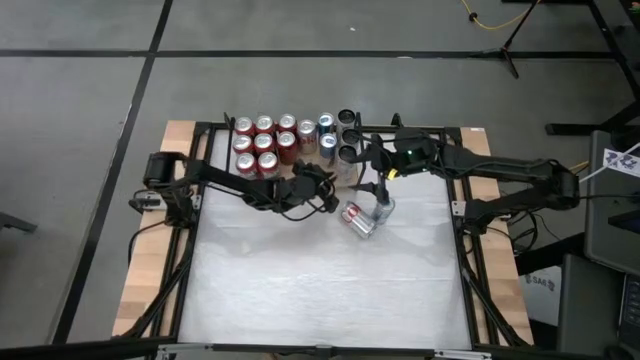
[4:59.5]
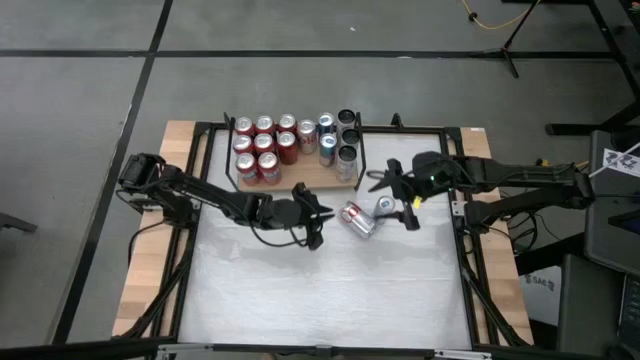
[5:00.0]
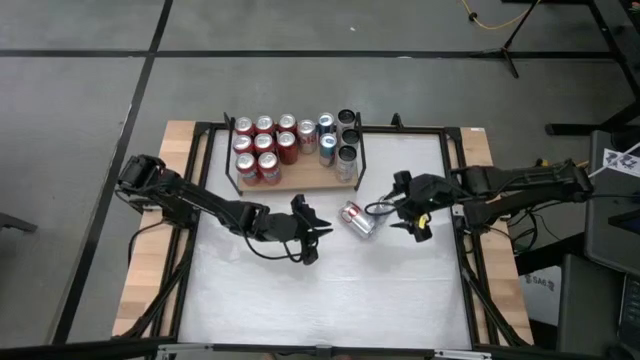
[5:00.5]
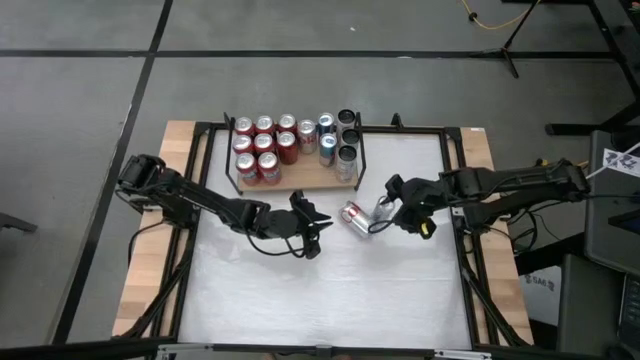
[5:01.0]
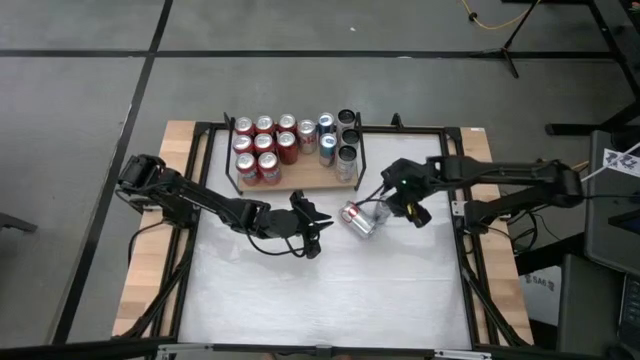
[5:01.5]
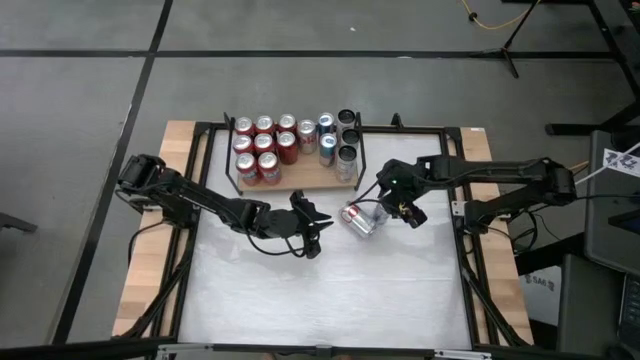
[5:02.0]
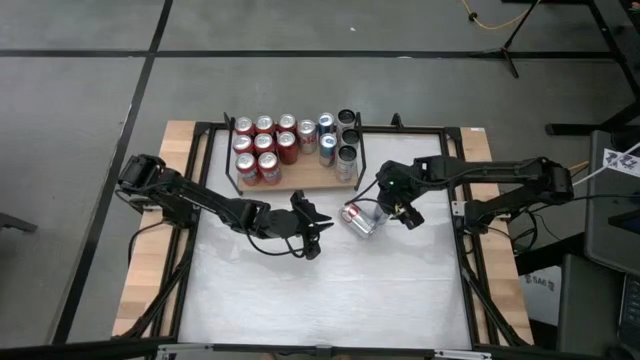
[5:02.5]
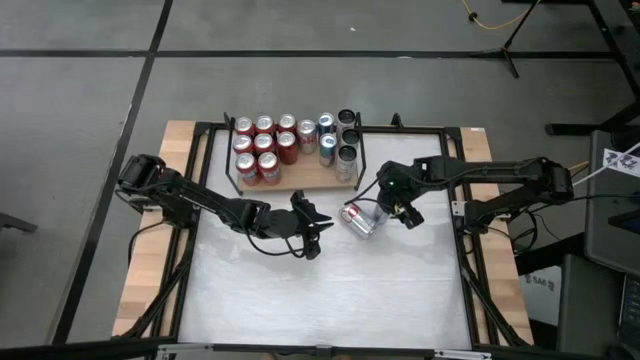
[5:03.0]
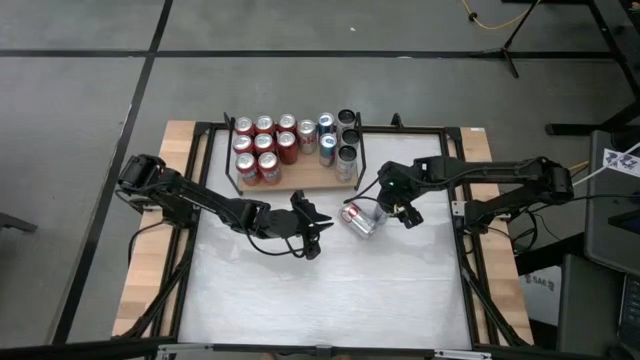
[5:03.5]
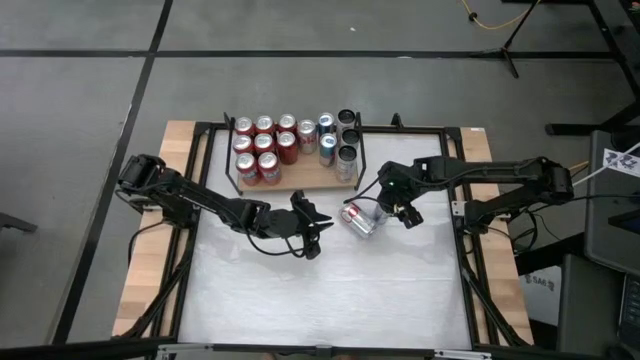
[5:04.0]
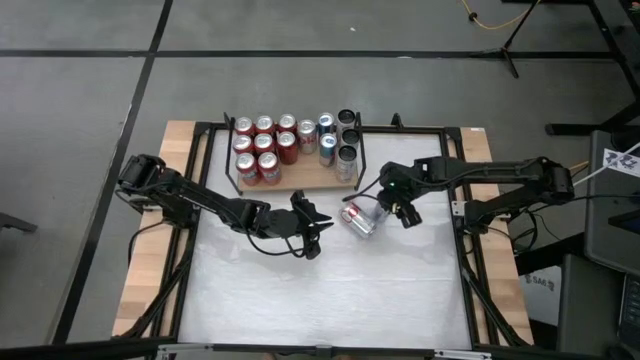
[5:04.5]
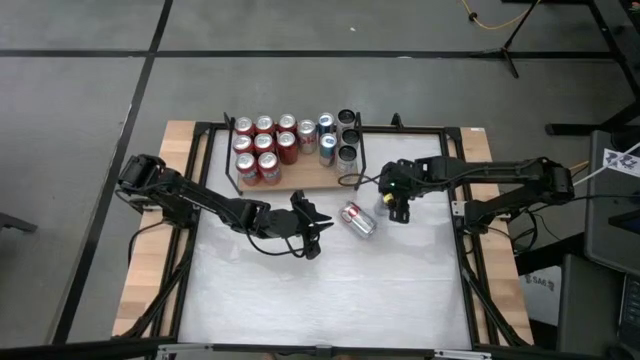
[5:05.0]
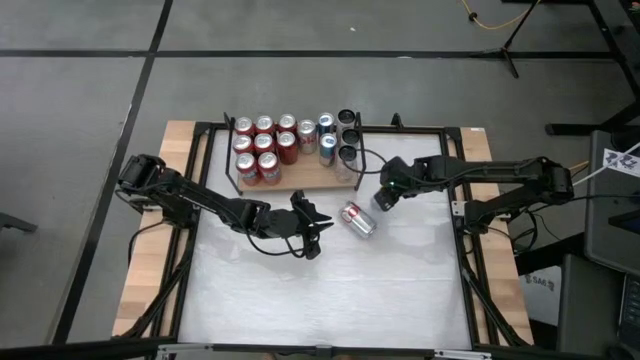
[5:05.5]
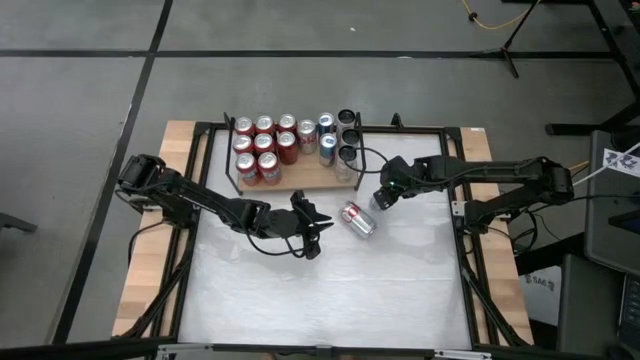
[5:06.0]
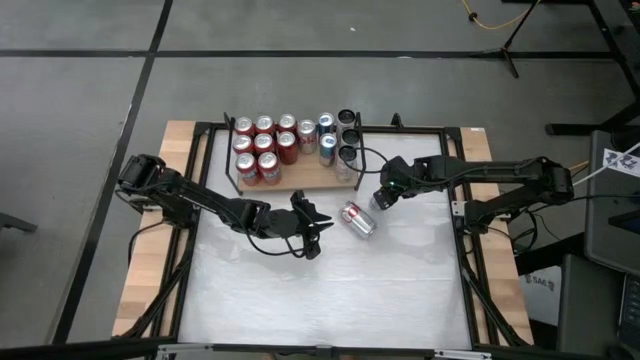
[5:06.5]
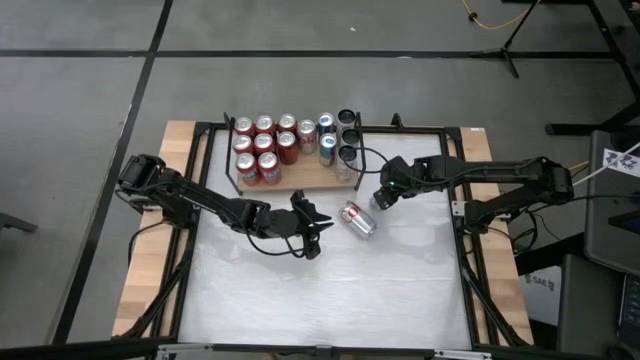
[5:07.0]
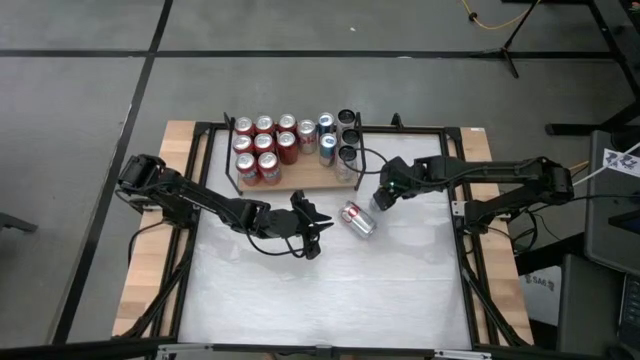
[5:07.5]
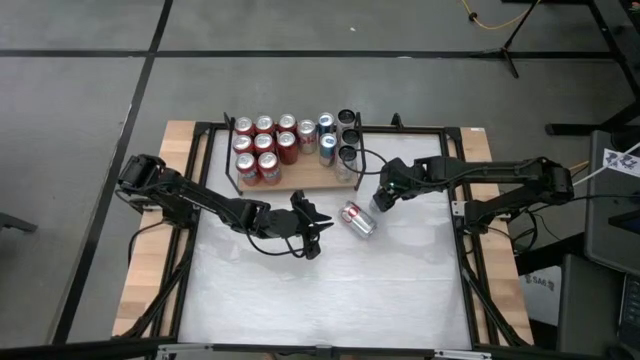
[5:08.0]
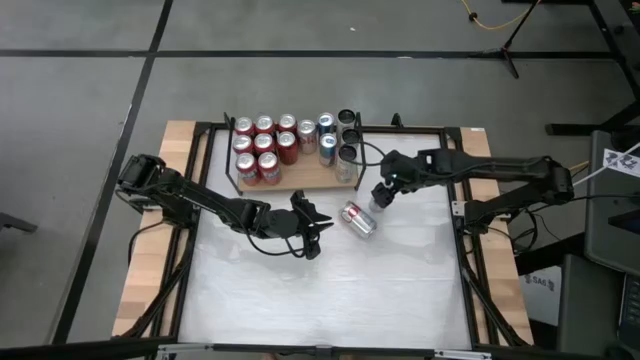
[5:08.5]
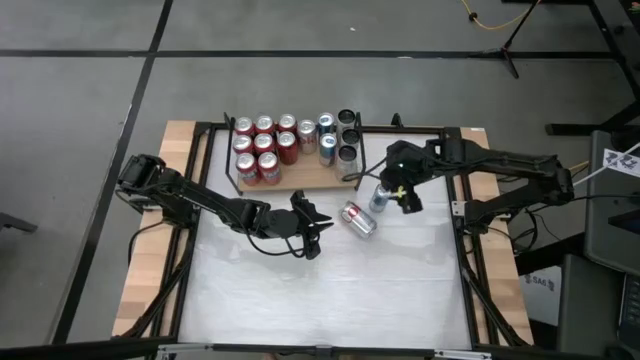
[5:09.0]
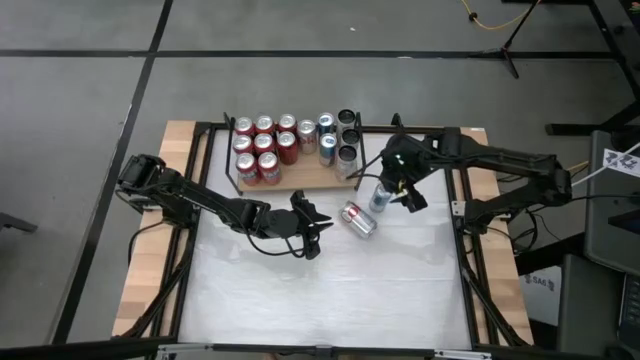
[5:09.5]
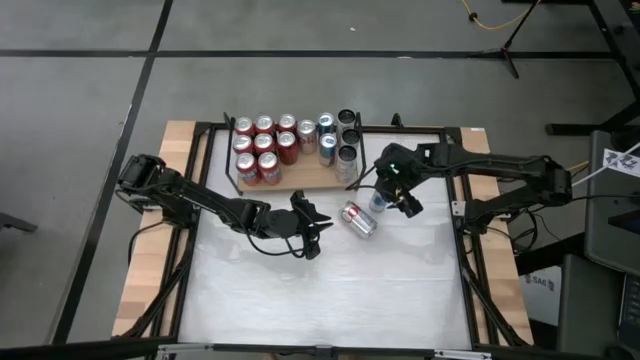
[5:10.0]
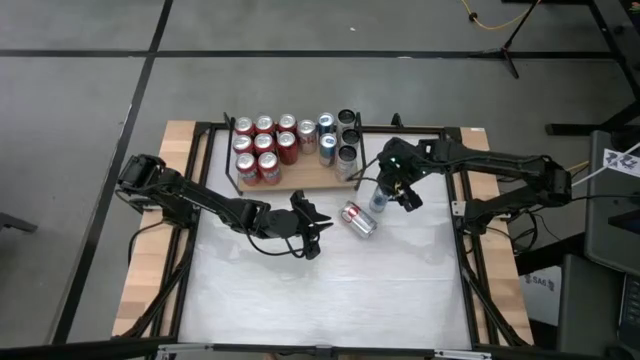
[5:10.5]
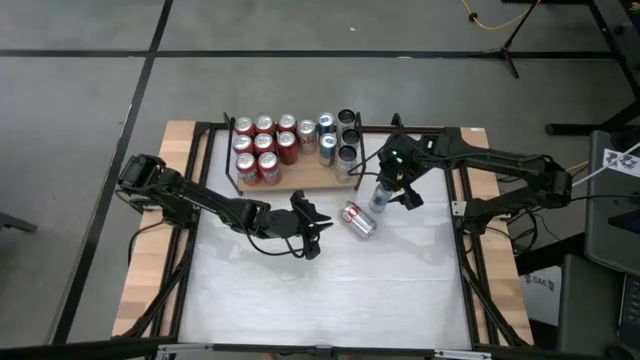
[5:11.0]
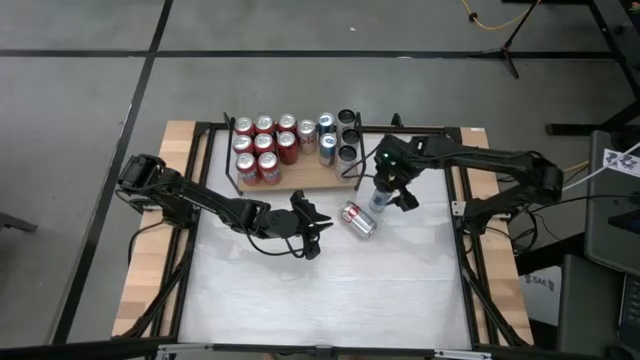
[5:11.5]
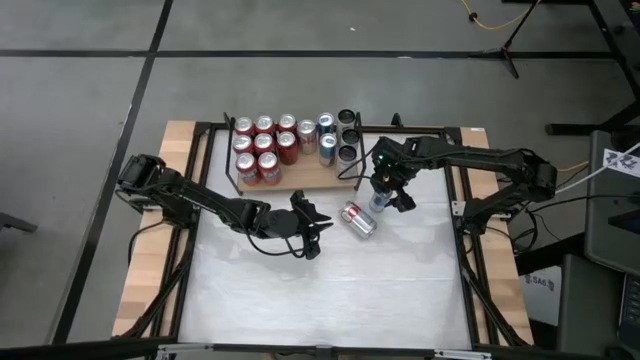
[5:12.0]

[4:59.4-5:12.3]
Task: Place canned beverage on shelf
Put the blue soda can on the shelf aligned with the other blue soda cans

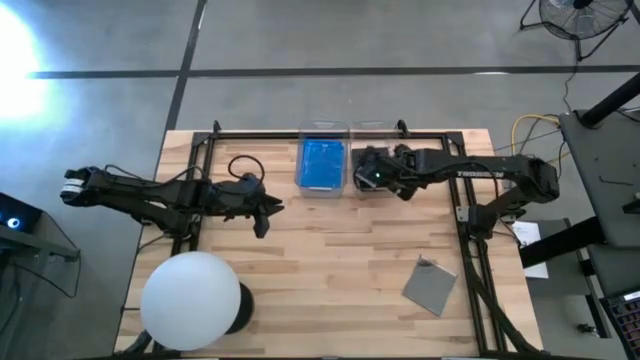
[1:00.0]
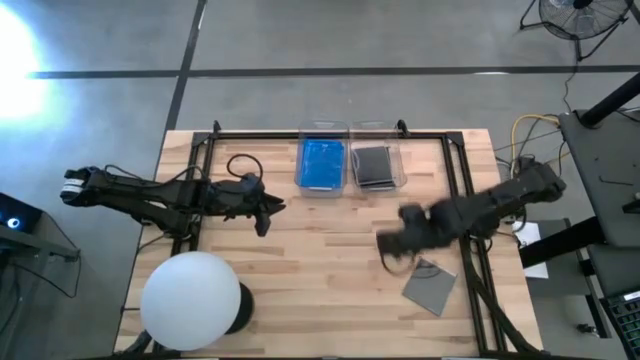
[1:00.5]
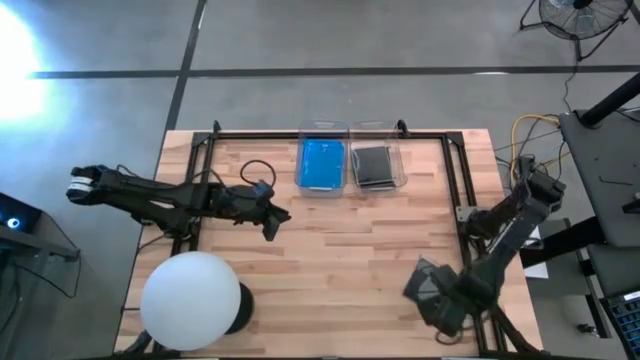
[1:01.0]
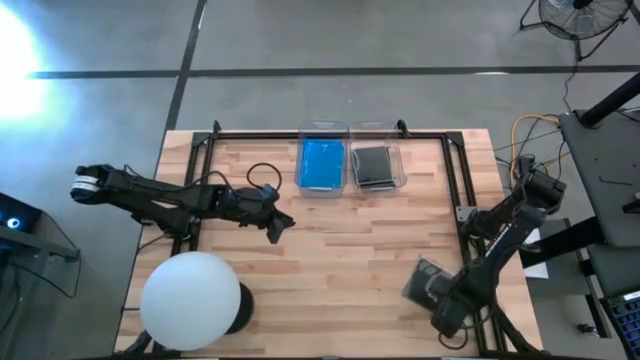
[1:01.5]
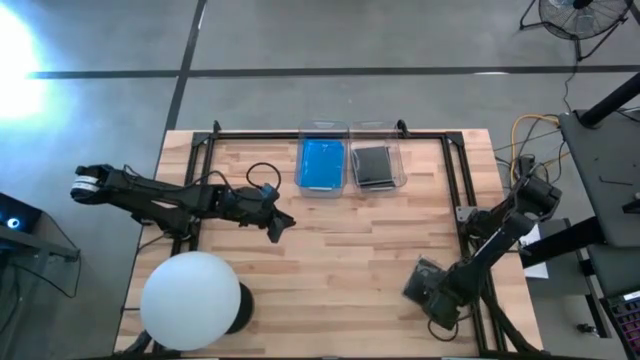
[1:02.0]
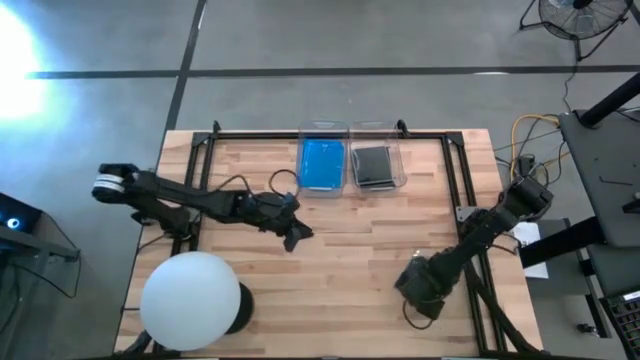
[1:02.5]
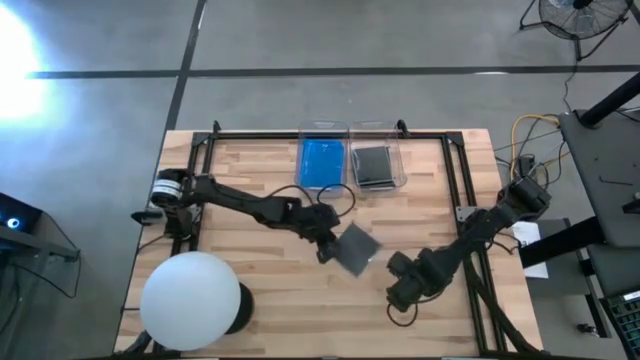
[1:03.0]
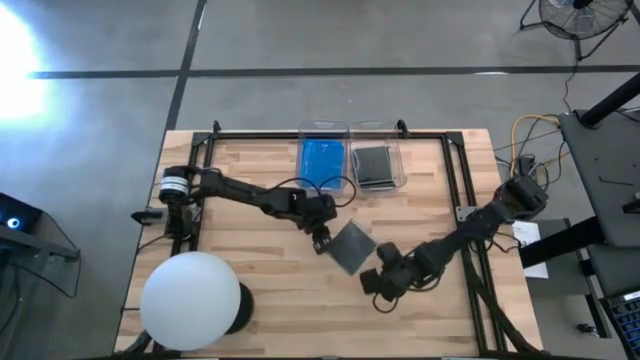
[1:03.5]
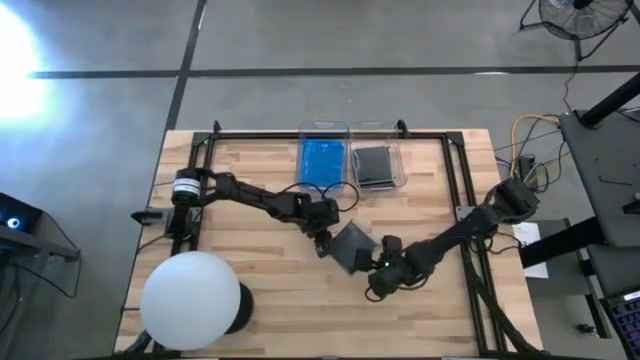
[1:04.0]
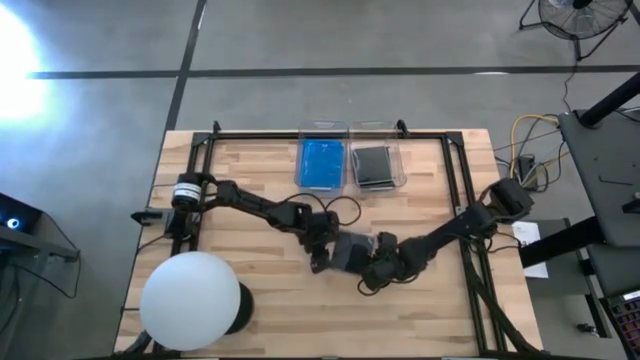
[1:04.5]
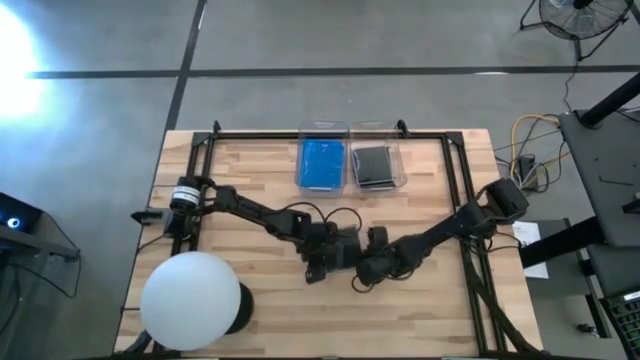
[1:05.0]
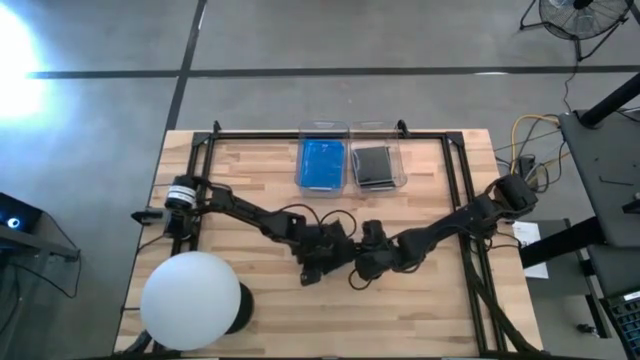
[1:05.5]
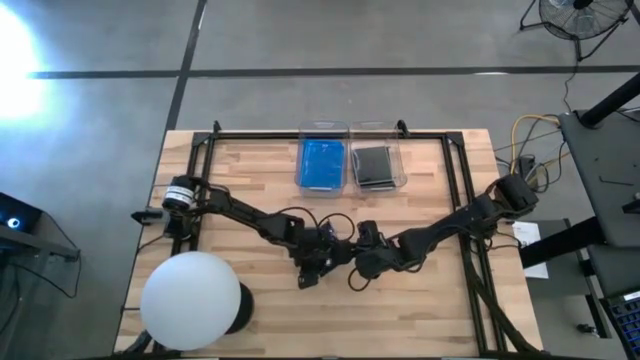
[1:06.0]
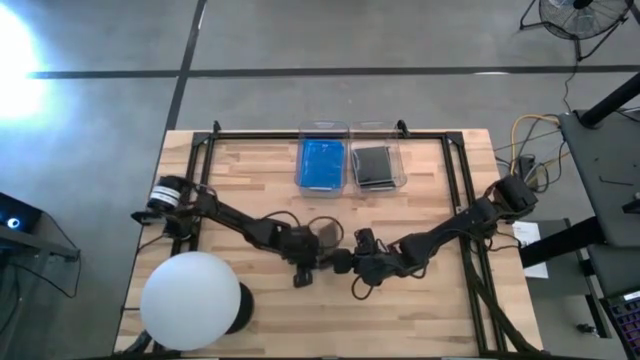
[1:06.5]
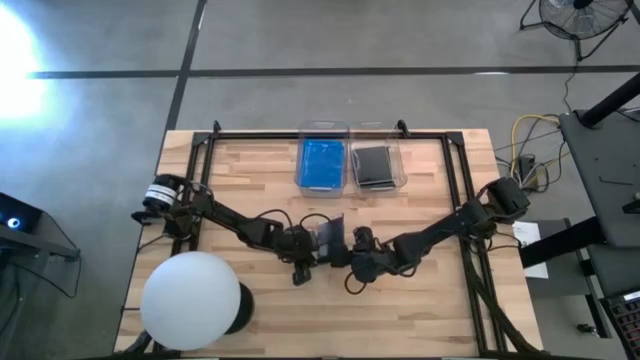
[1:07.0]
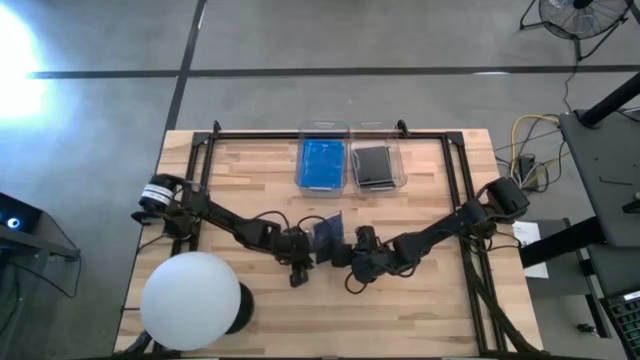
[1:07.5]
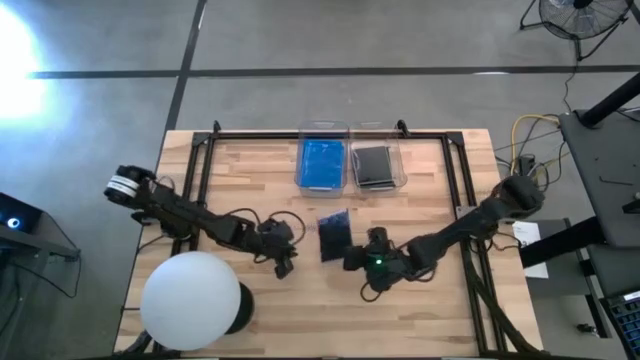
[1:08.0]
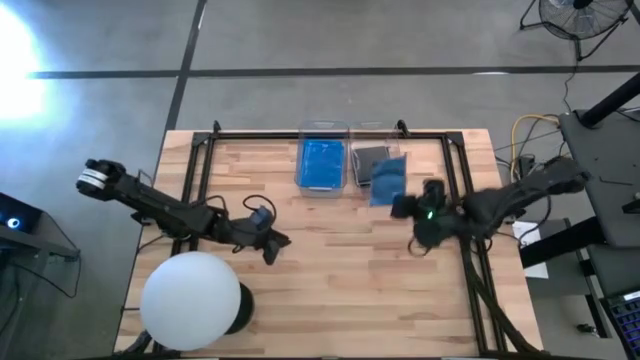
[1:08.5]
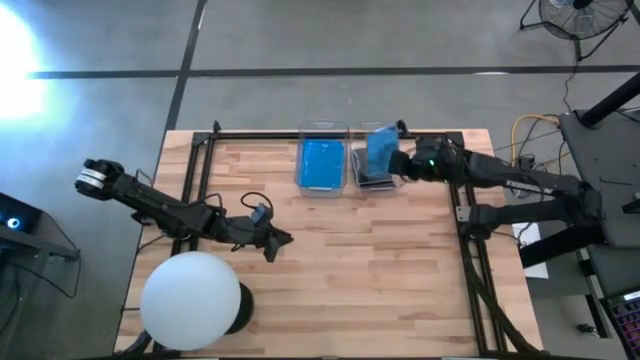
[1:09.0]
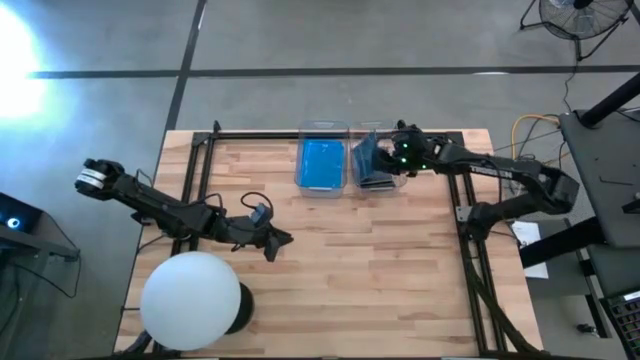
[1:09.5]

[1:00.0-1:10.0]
Task: Pick & place jewel cases by type
Put the black CD case into the right transparent bin
